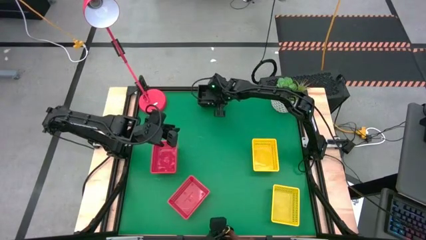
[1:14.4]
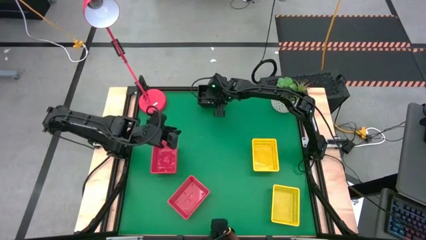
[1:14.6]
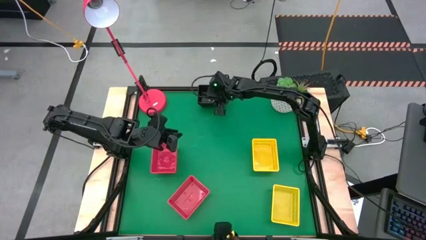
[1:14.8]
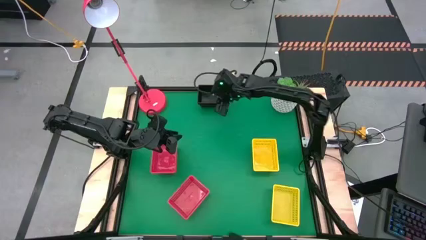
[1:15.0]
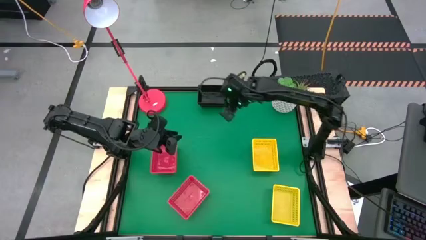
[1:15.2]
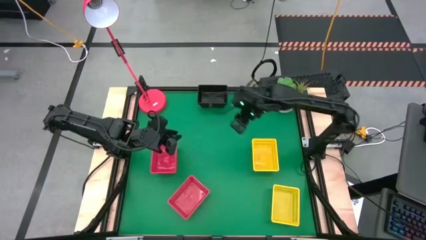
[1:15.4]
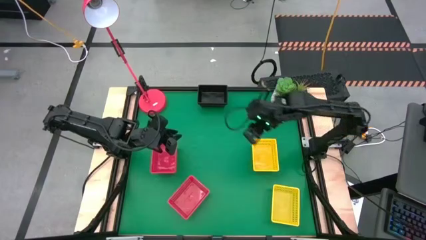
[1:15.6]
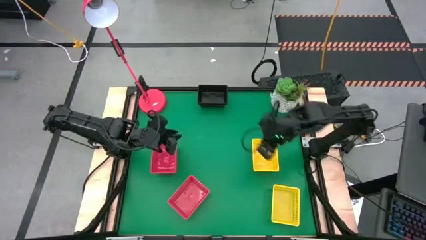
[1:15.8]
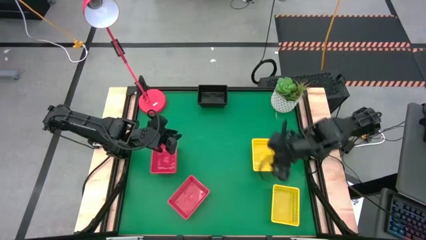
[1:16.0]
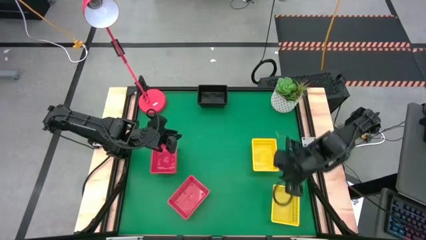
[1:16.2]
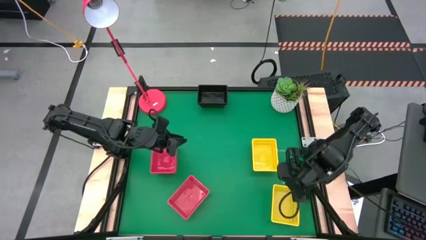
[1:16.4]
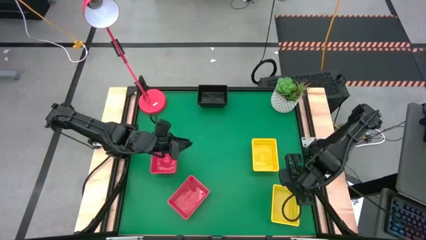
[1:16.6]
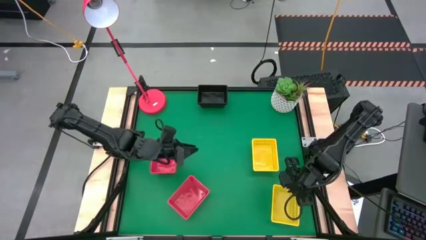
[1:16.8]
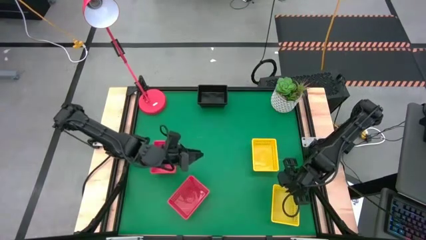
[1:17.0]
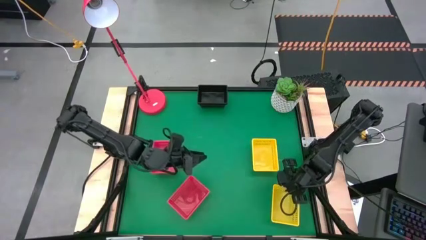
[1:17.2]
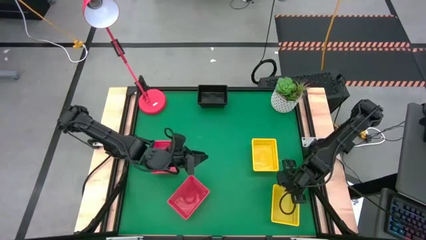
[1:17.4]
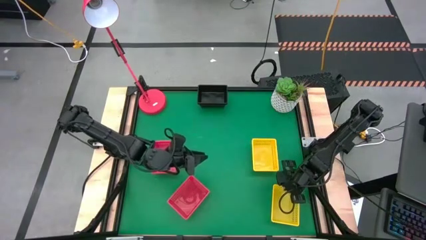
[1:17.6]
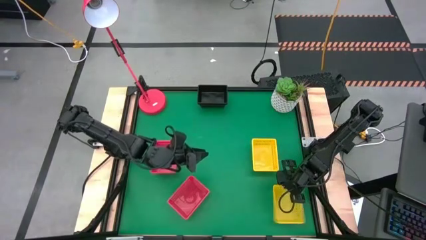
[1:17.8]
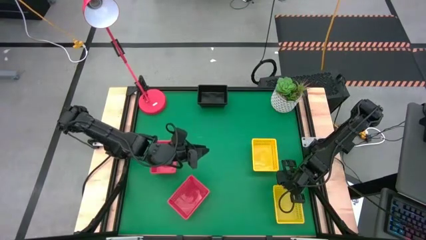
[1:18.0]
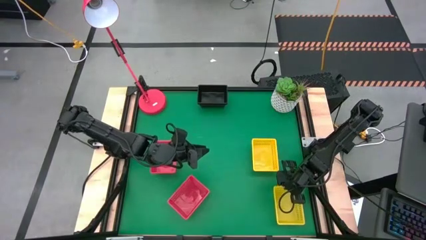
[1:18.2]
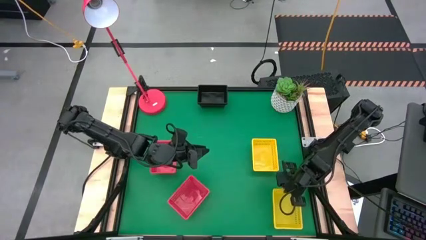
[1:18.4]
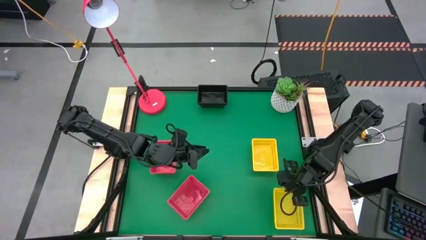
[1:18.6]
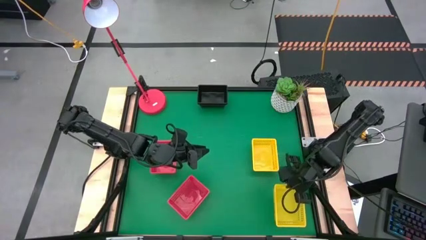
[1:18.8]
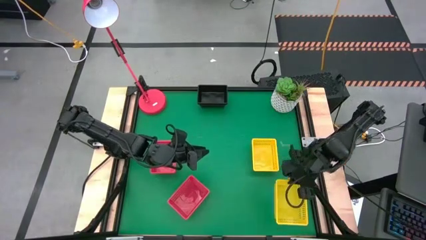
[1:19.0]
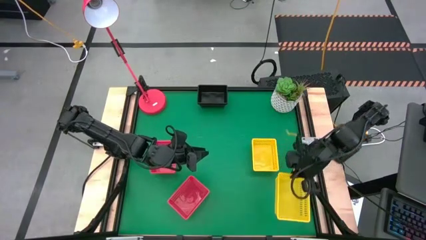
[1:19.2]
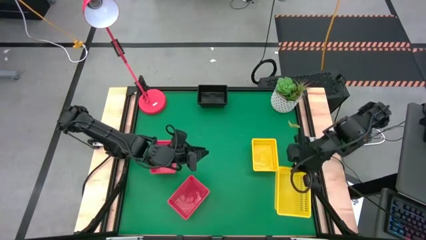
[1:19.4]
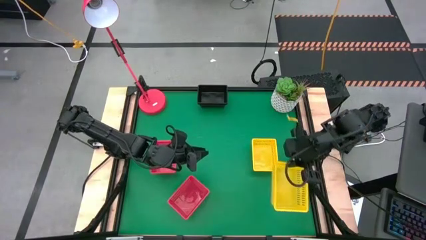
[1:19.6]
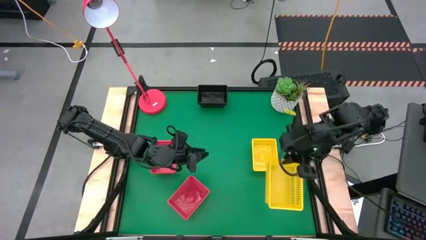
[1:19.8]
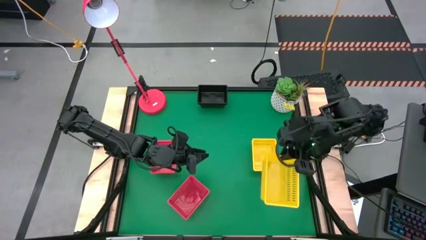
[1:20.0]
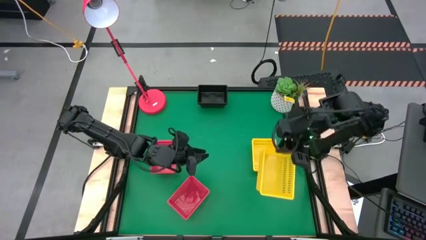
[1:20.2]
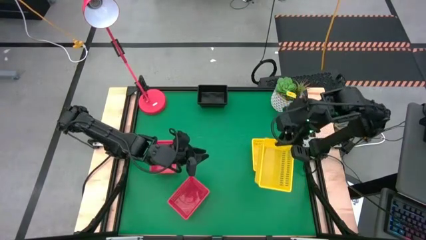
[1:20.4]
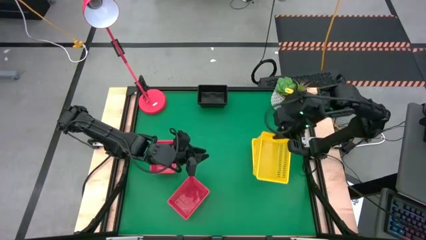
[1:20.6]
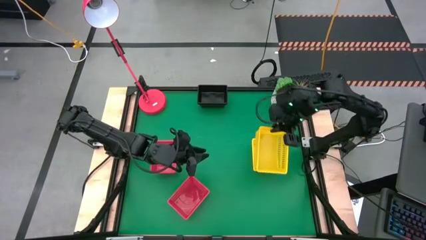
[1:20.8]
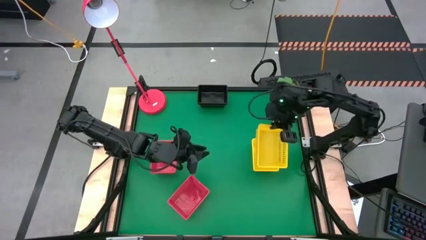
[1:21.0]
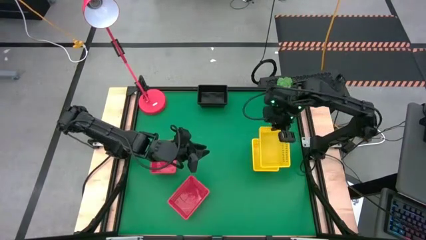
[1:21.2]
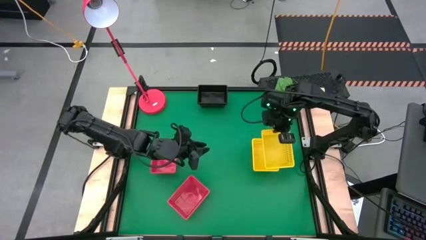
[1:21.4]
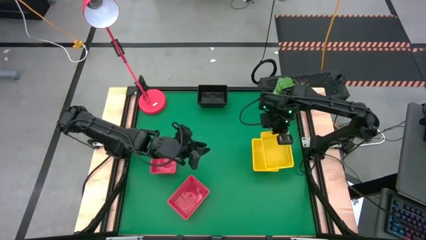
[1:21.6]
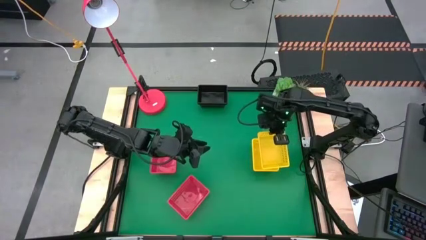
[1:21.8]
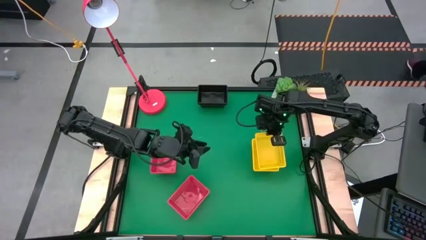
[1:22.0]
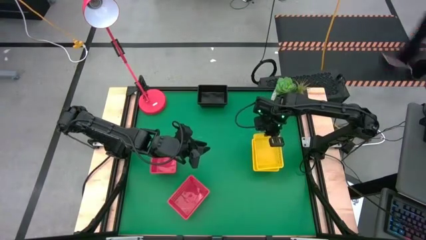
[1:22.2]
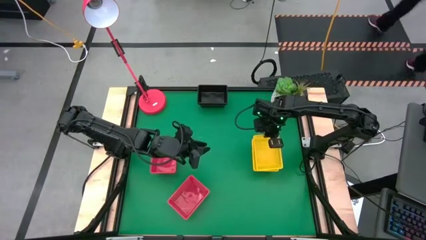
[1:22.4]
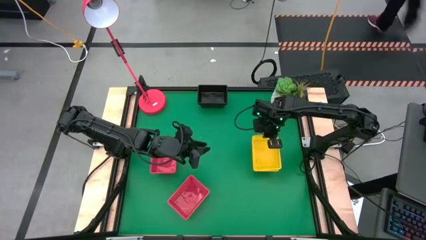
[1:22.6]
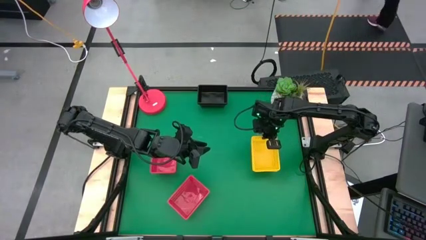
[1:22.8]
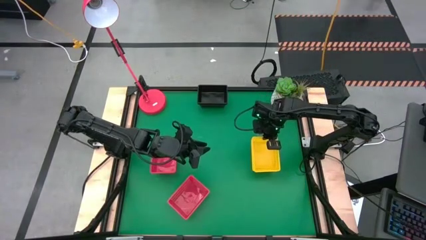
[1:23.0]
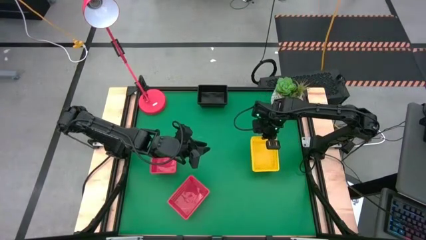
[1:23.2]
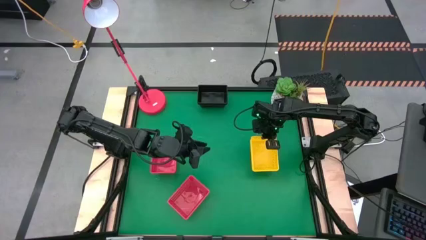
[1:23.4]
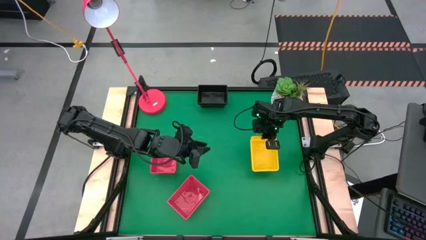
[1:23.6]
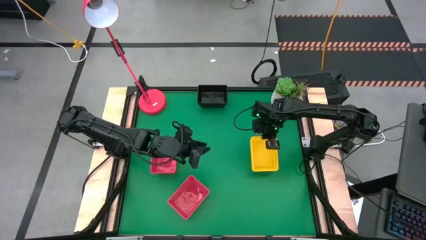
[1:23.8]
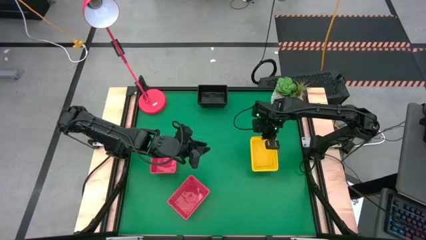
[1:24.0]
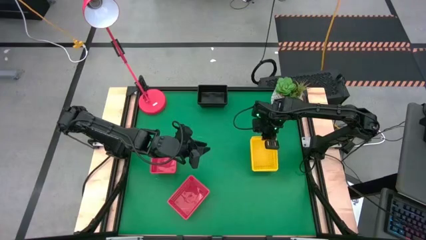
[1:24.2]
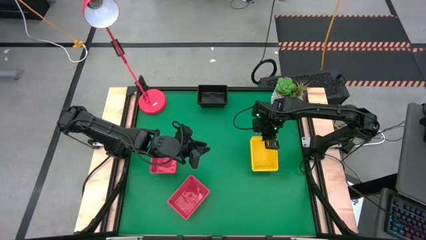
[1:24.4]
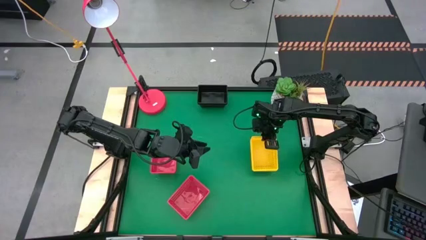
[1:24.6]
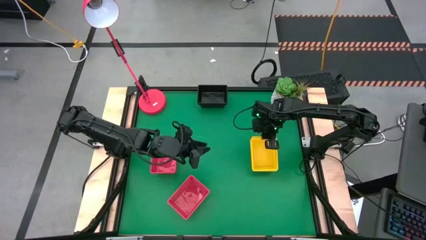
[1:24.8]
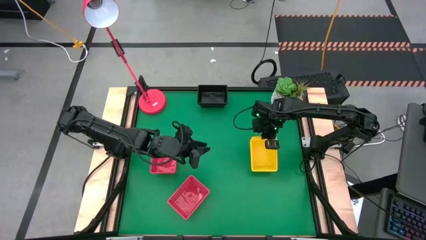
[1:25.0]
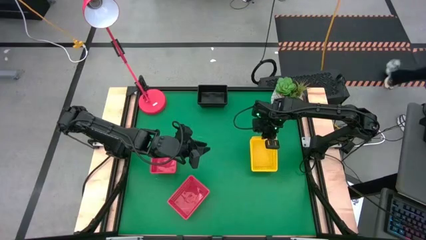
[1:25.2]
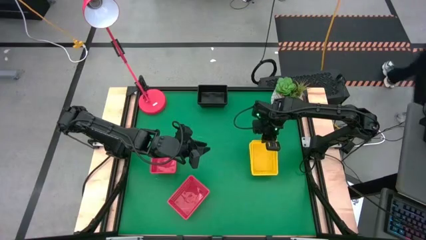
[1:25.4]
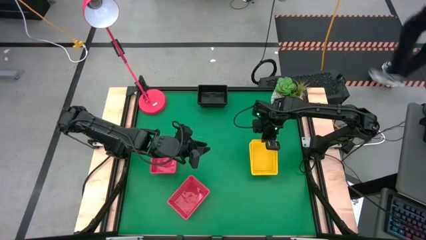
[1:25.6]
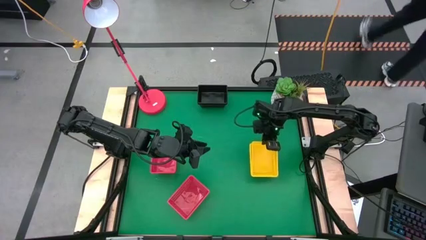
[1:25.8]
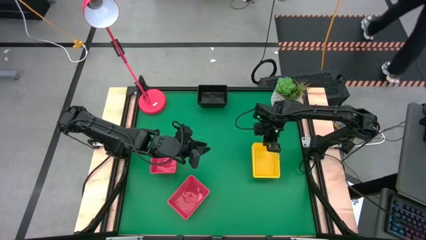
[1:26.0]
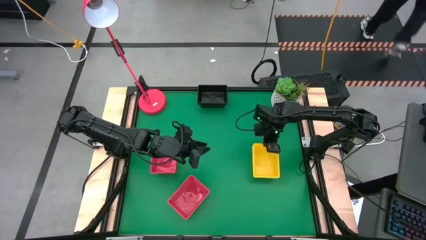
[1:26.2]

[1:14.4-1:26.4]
Stack the bottom yellow bin on the top stacked yellow bins
